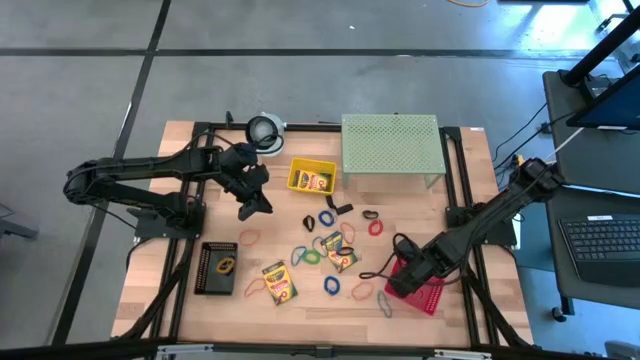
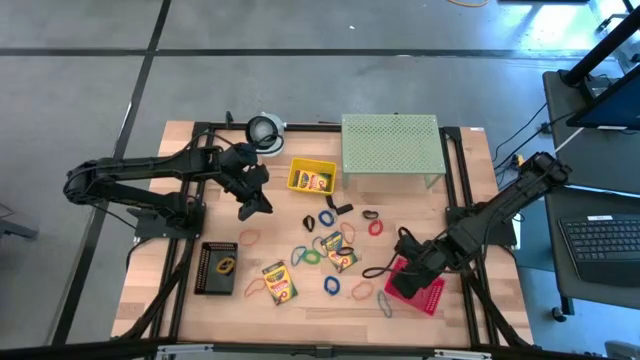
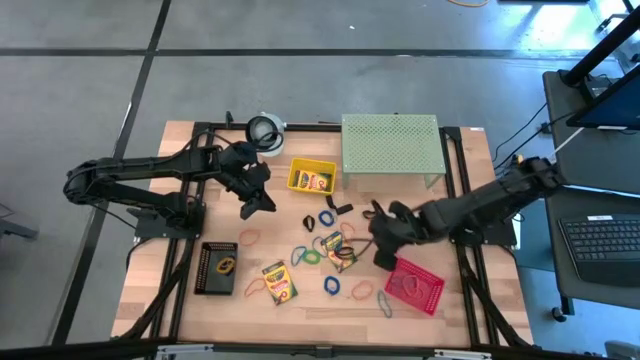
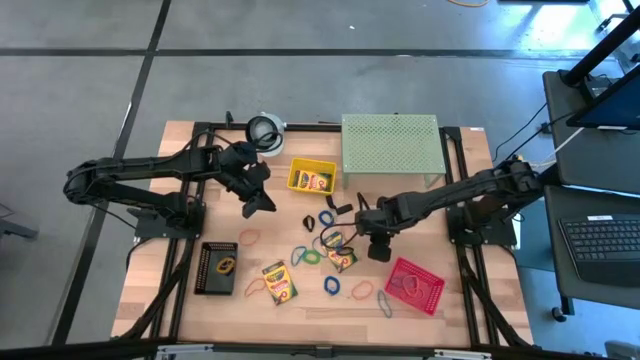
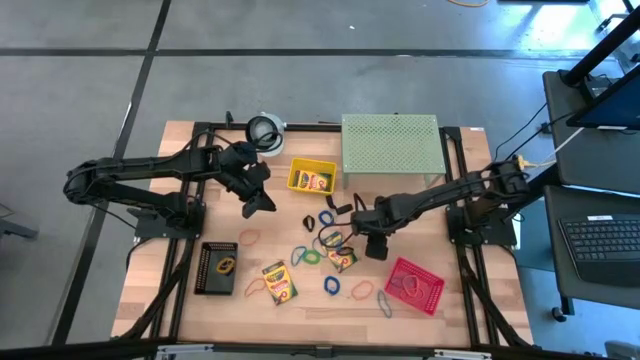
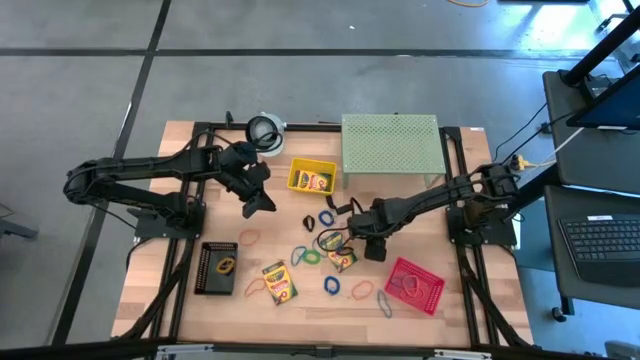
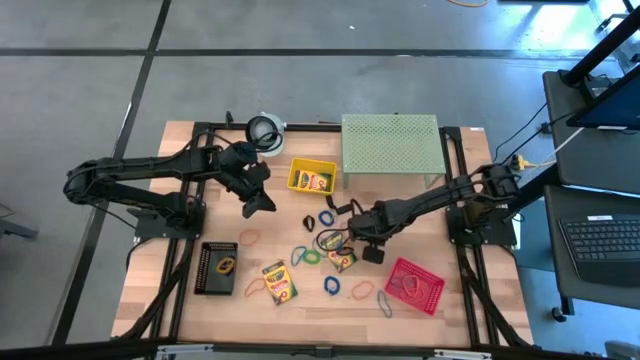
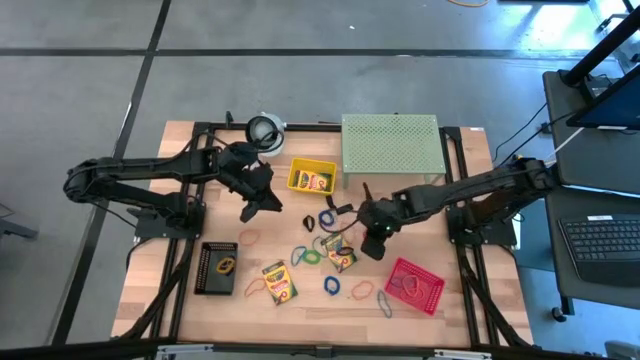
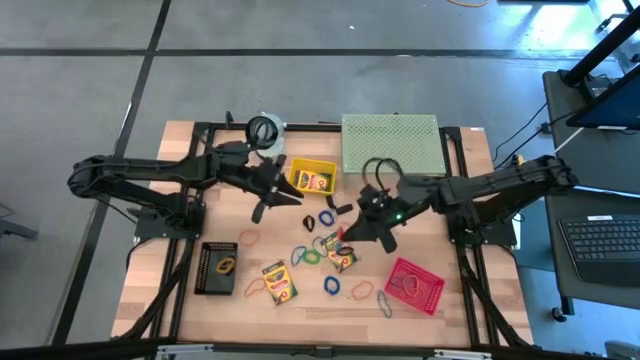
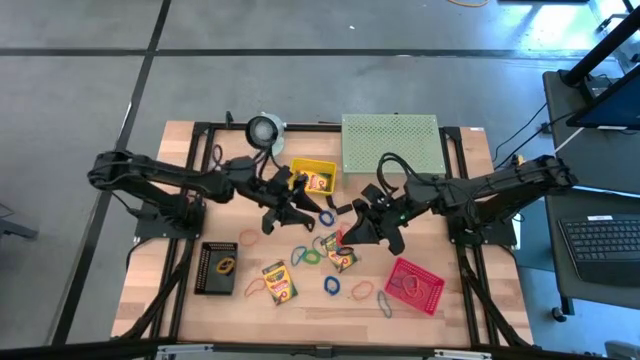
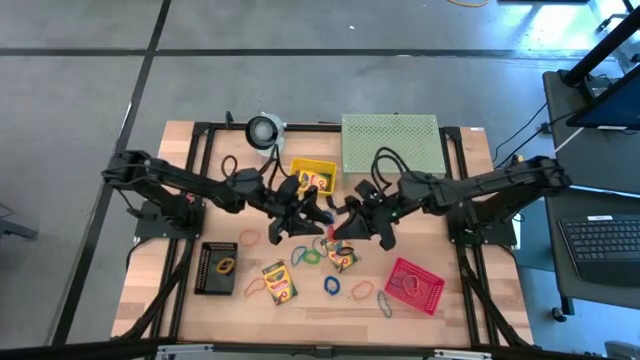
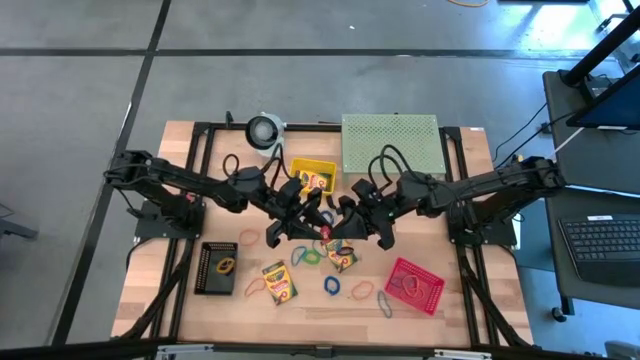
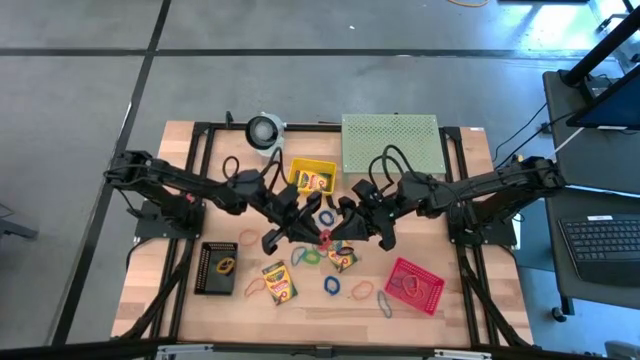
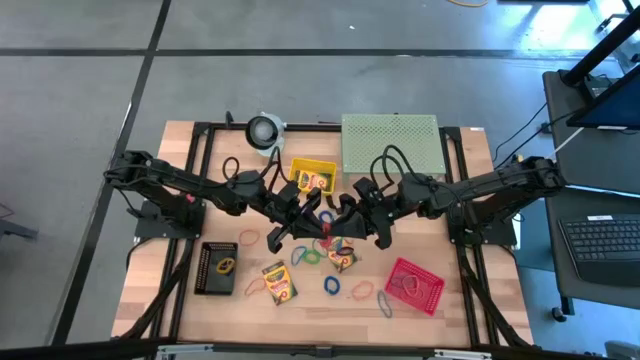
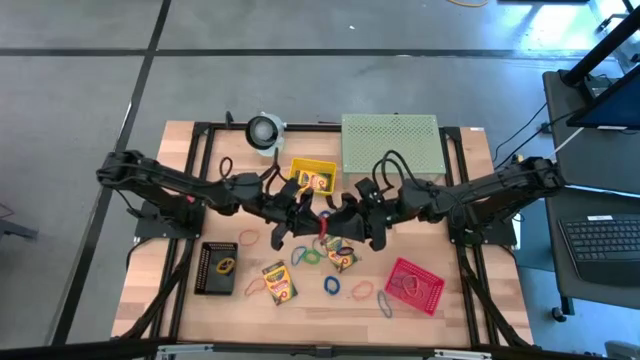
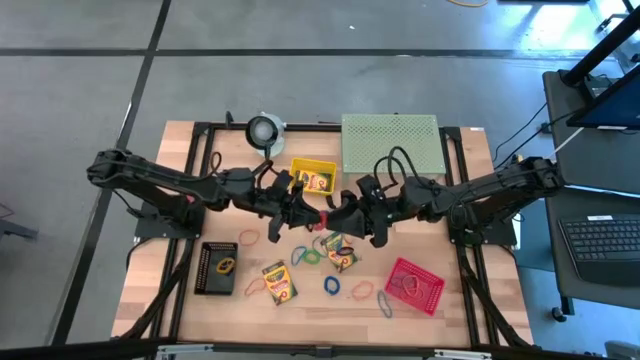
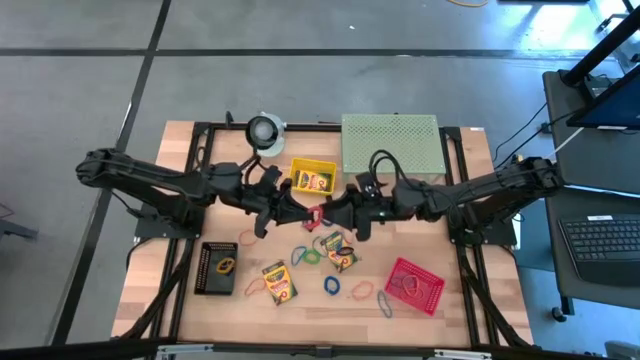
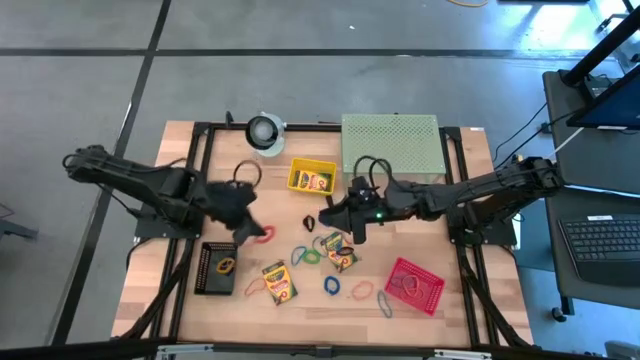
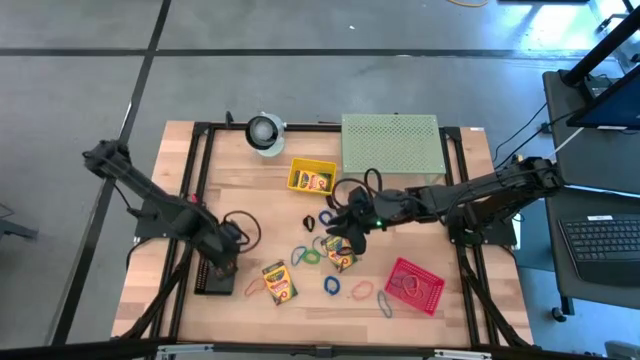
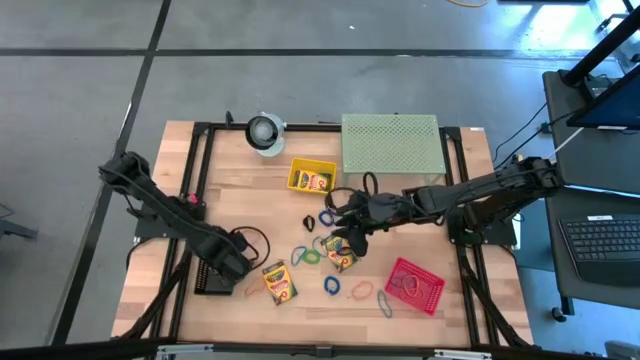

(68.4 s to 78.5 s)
Task: Pick & Place Office Desk Supplies
Put the orange spring keychain into the black bin

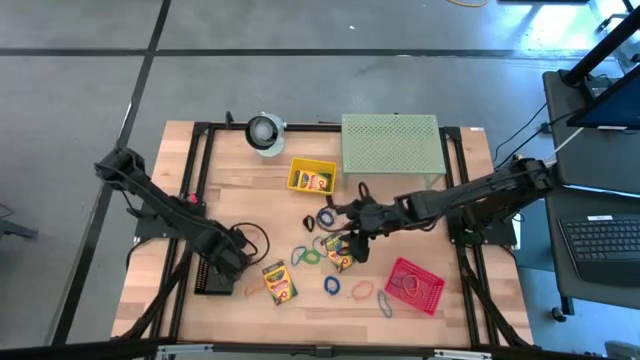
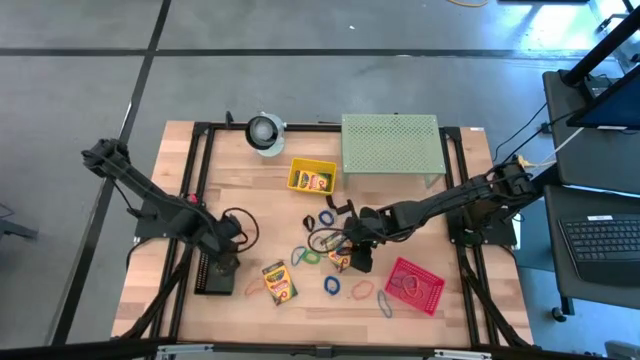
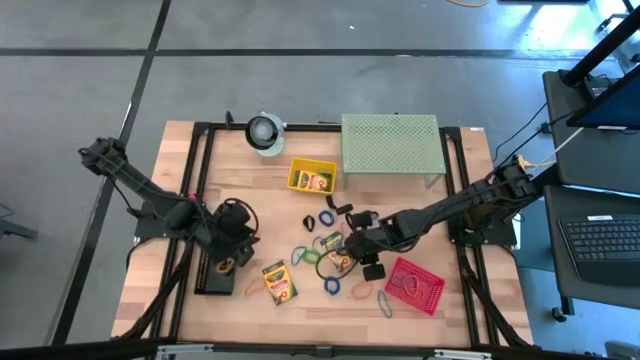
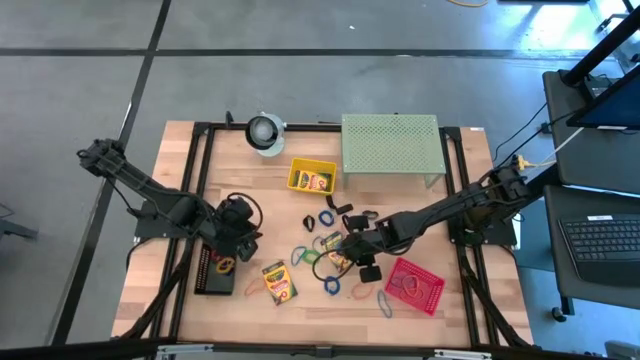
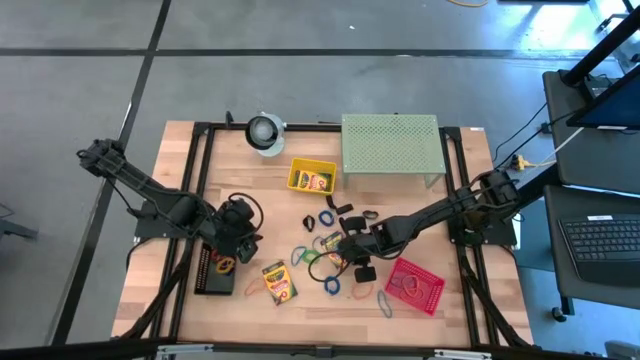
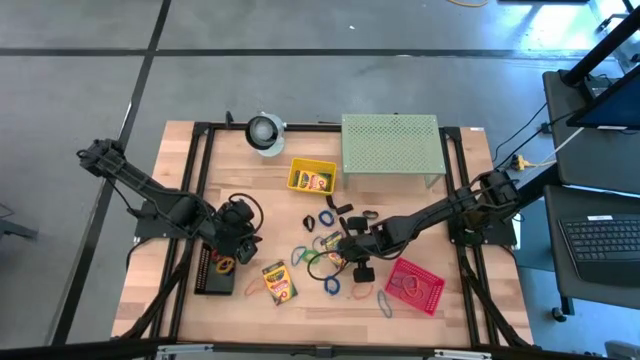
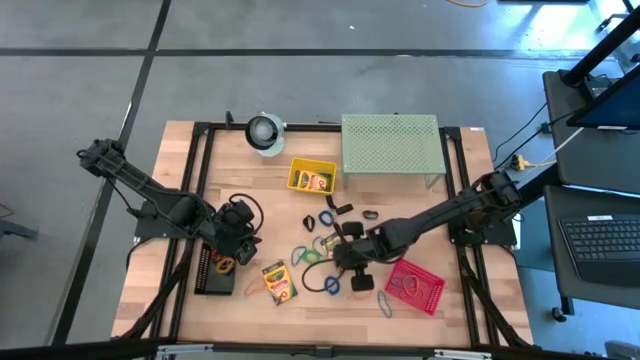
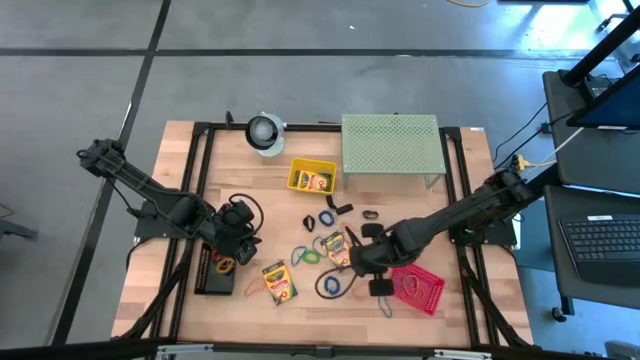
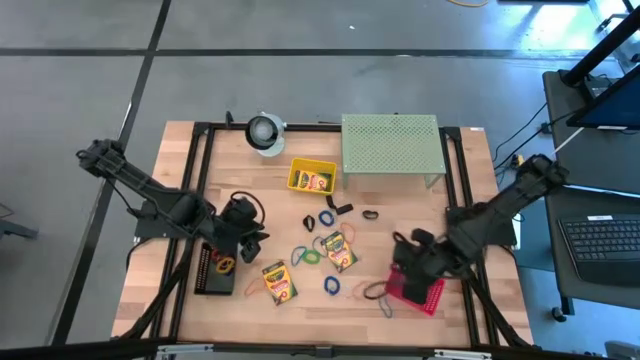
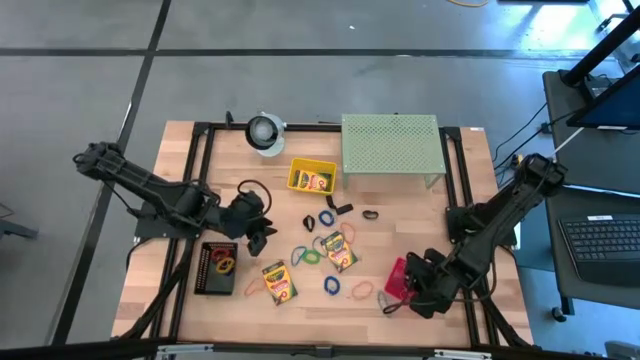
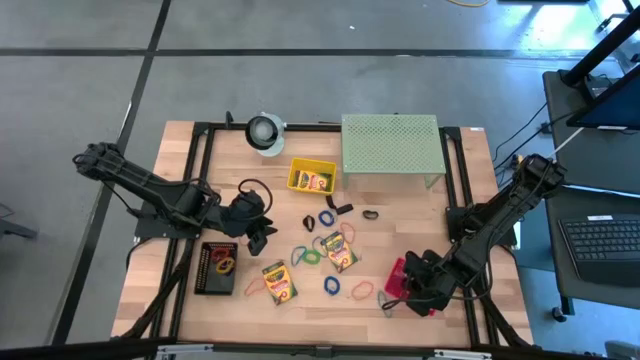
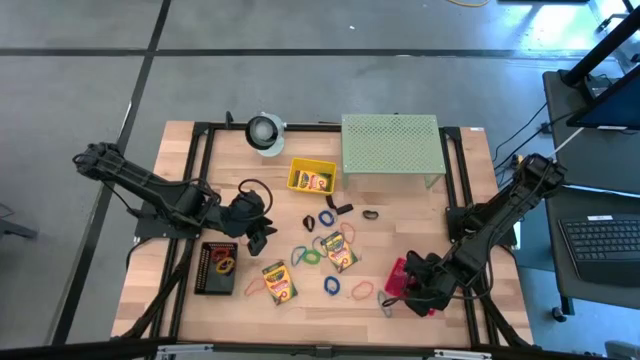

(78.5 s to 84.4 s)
Put the black rubber band into the red bin

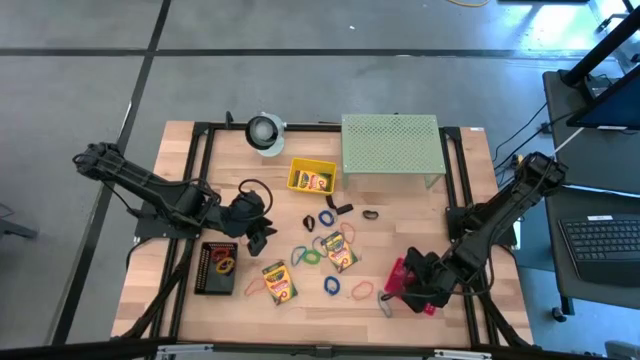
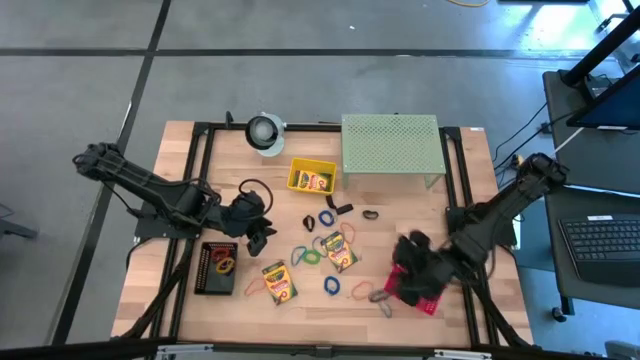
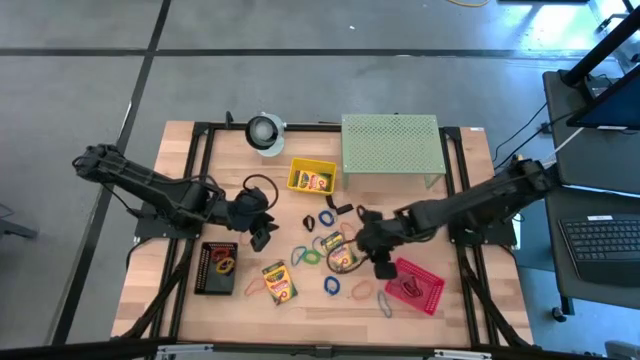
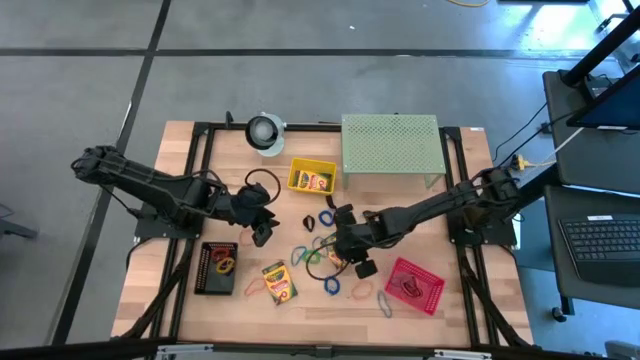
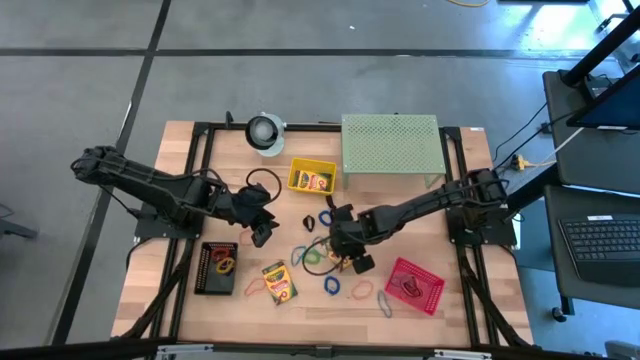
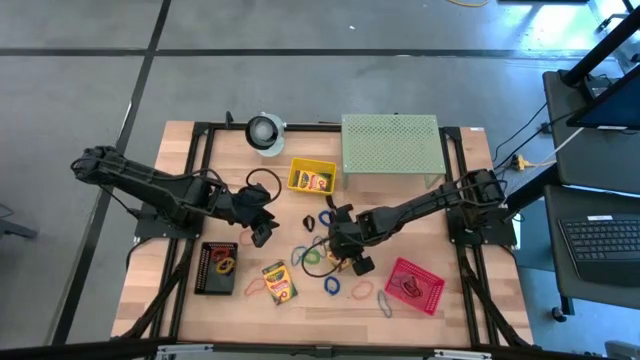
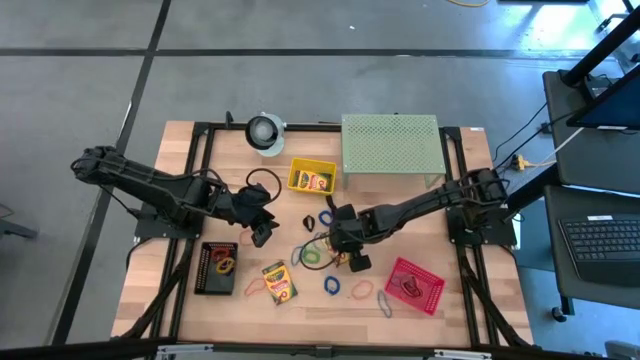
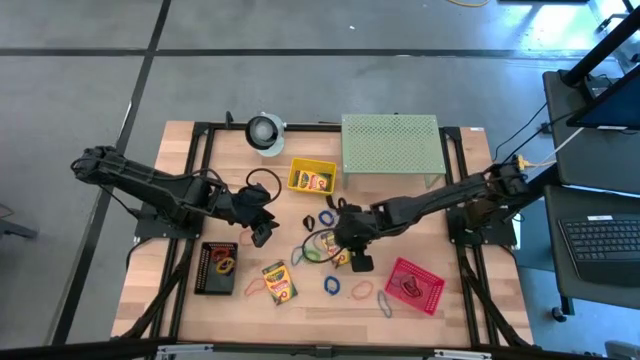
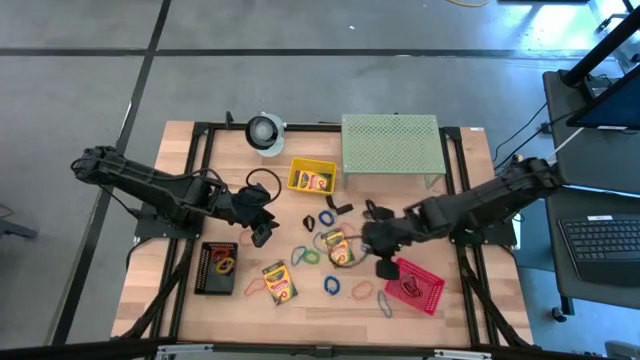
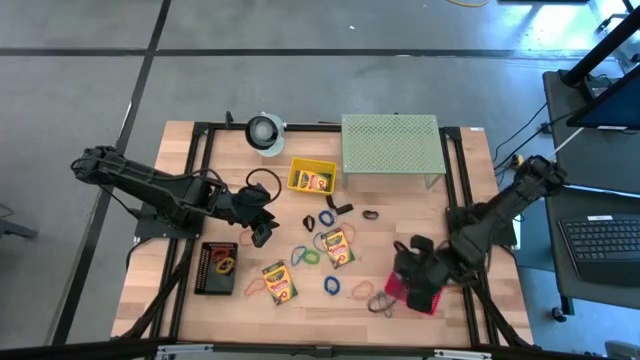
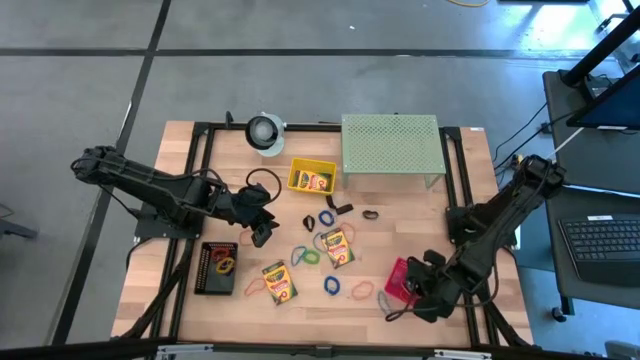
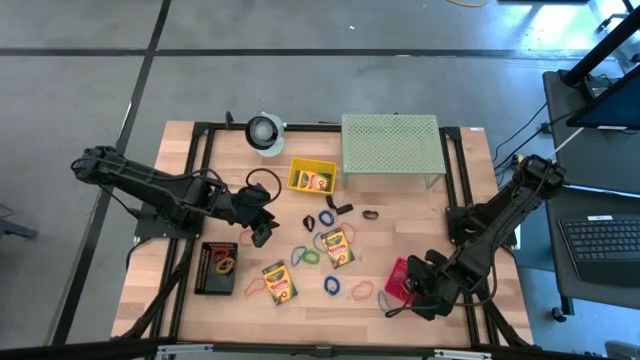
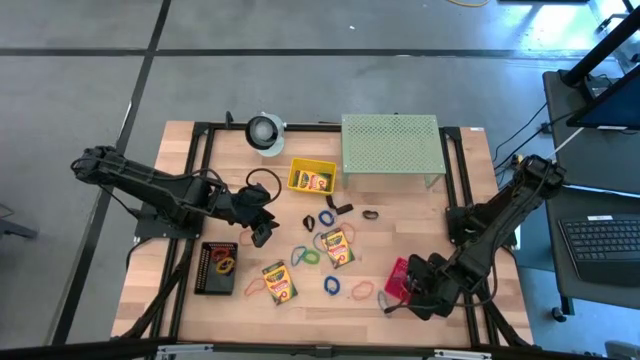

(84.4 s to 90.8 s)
Put the blue rubber band into the red bin
